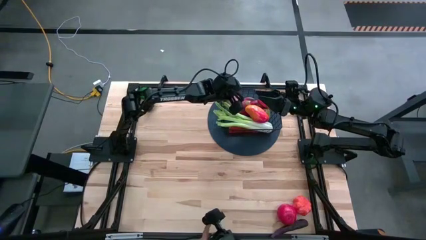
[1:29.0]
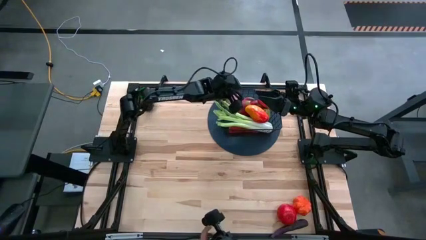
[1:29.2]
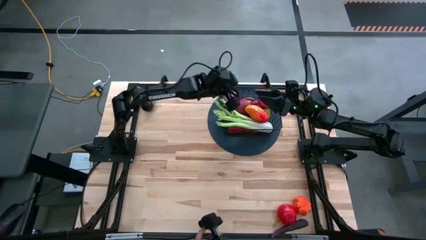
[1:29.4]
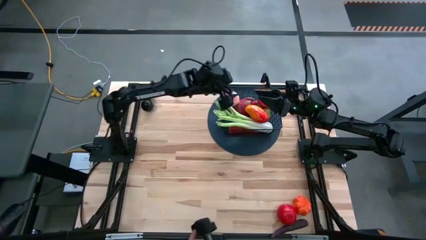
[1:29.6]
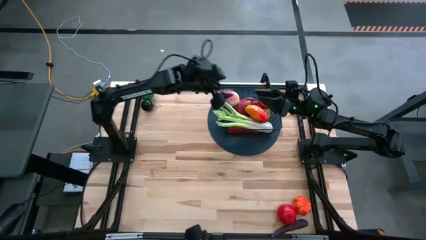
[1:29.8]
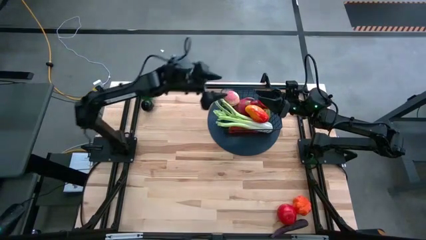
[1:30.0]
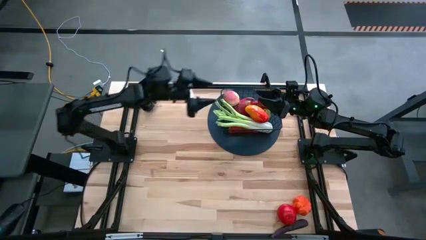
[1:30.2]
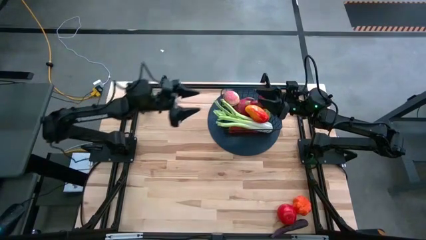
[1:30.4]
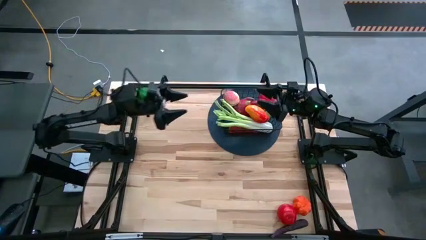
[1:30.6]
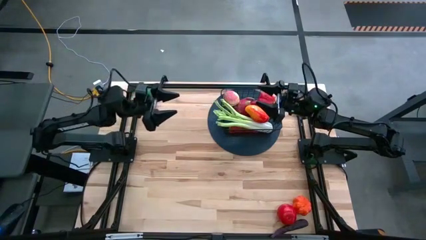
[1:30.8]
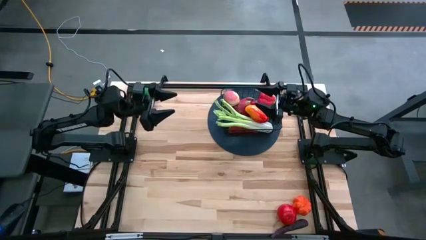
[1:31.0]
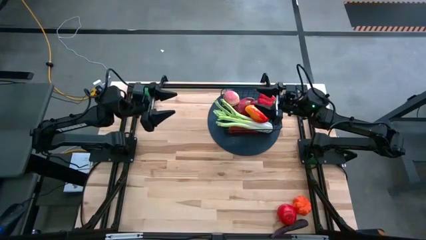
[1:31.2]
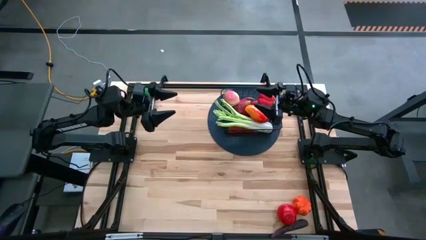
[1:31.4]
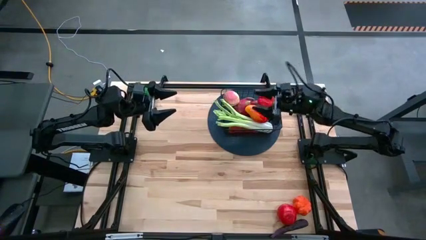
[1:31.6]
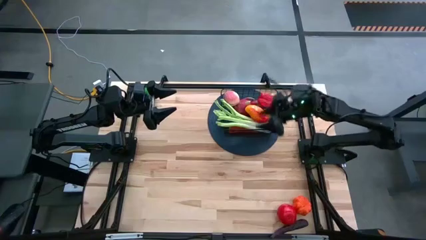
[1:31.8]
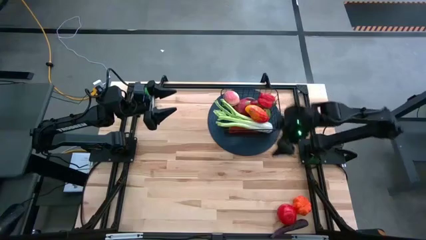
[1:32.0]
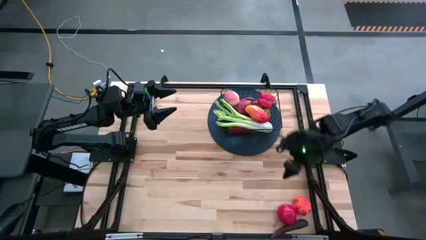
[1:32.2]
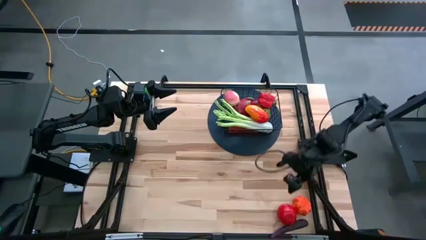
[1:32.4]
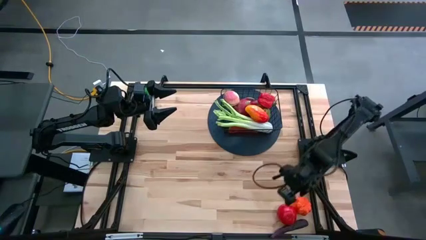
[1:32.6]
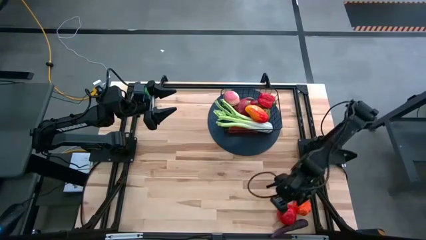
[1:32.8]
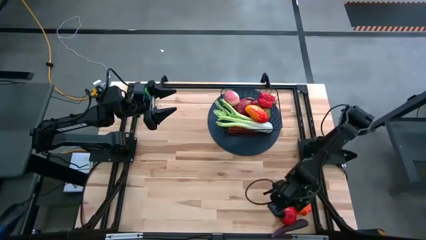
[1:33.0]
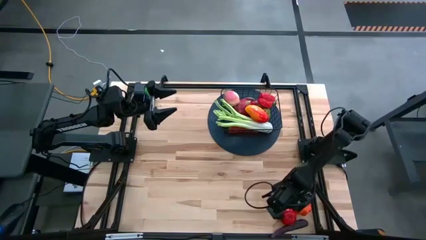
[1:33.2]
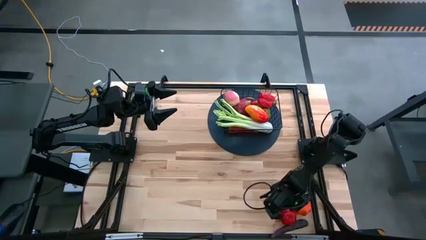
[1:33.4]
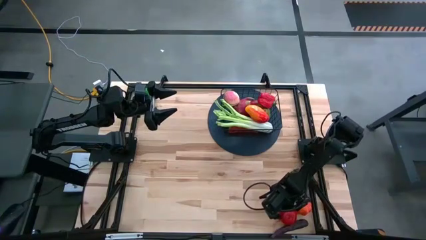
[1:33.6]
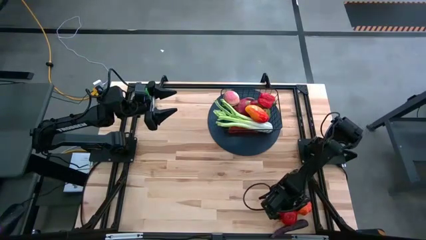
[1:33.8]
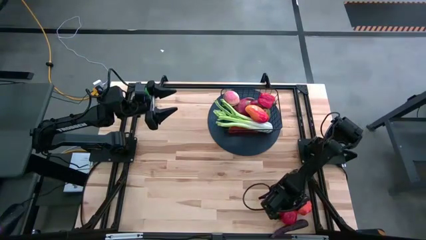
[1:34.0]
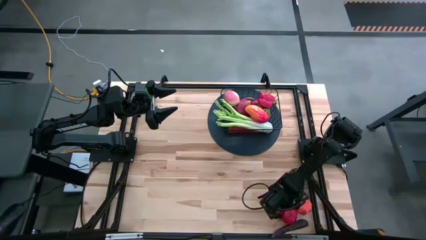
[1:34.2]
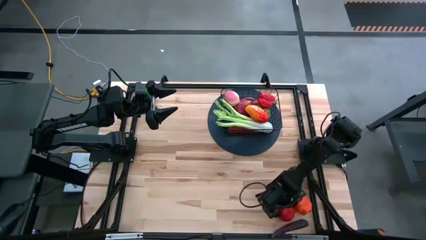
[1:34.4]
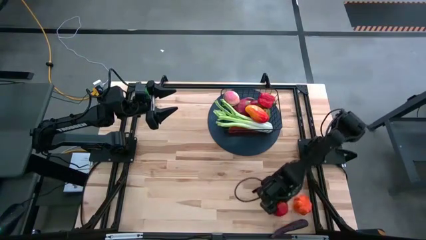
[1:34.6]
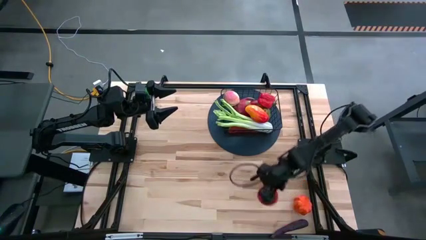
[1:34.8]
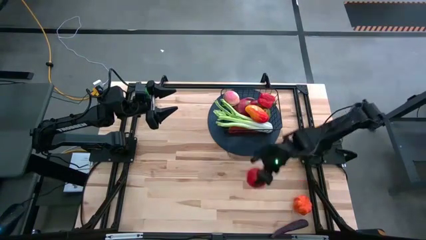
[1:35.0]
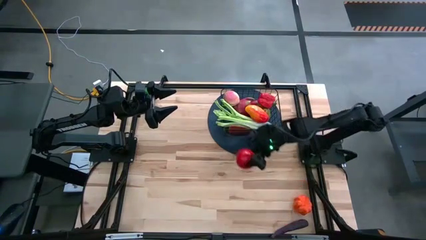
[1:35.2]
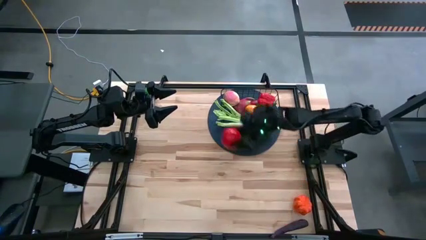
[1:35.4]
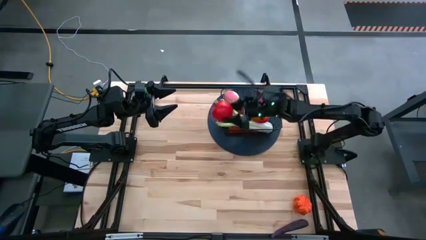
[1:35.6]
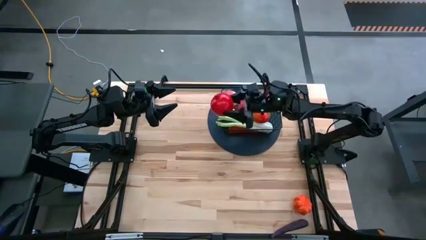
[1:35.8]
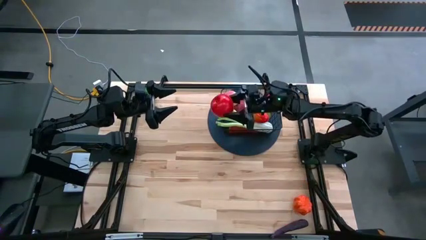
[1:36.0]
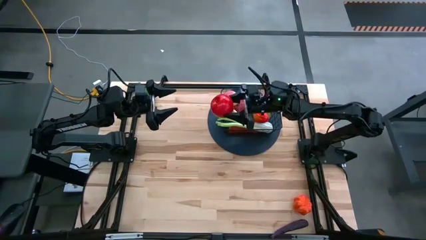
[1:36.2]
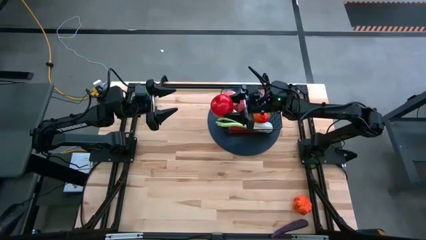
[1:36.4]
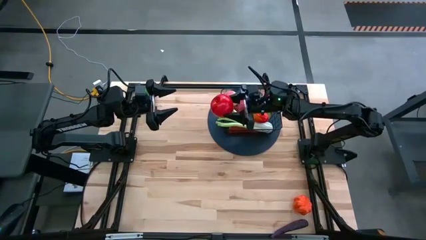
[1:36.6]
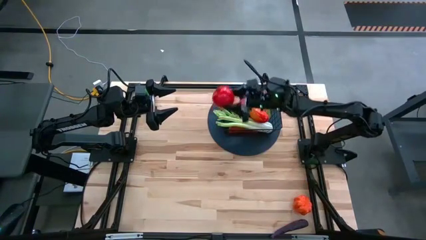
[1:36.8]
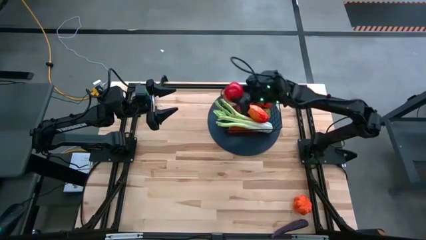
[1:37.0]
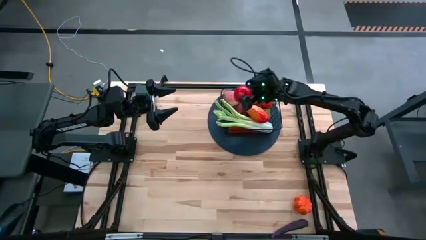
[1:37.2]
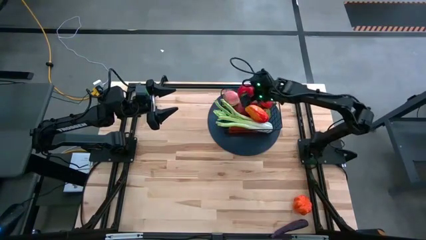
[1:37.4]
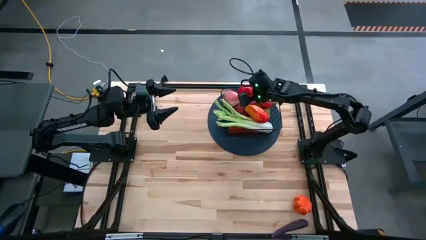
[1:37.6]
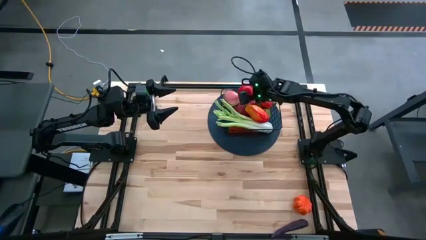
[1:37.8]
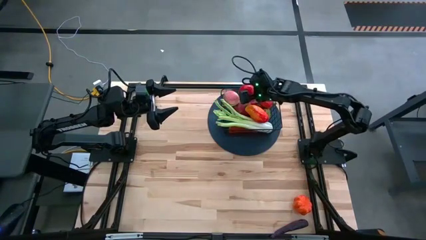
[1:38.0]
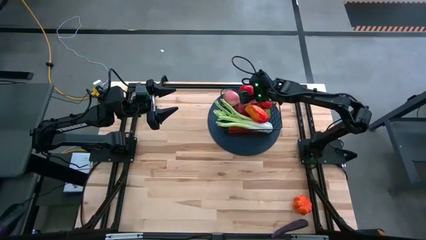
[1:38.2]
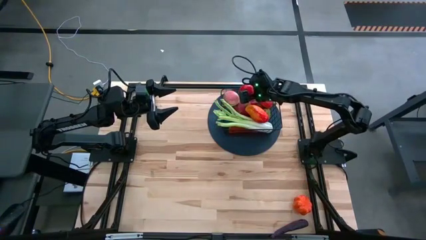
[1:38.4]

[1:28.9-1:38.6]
Task: Build produce basket
Put the apple into the black wire basket

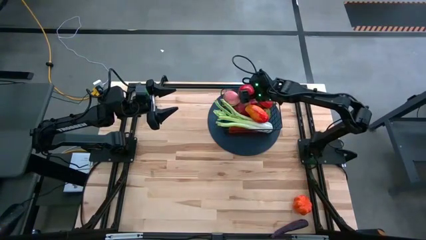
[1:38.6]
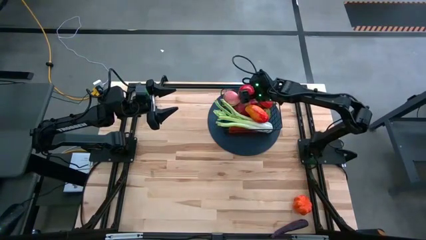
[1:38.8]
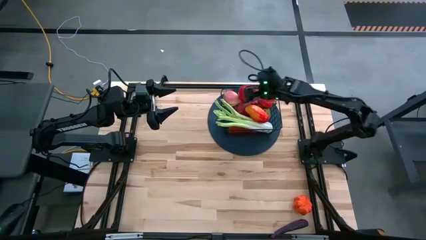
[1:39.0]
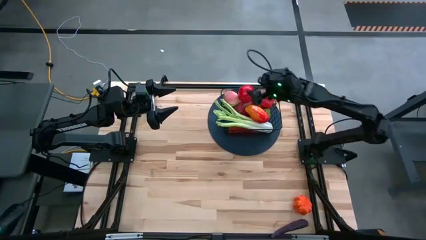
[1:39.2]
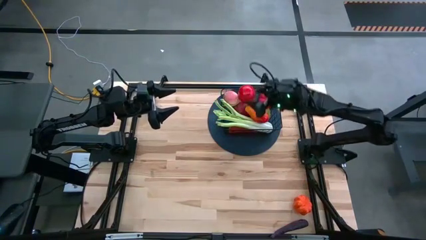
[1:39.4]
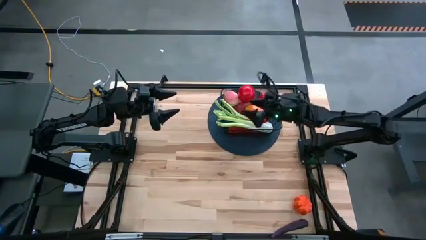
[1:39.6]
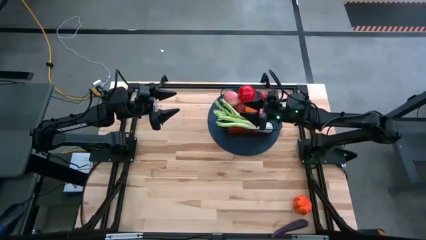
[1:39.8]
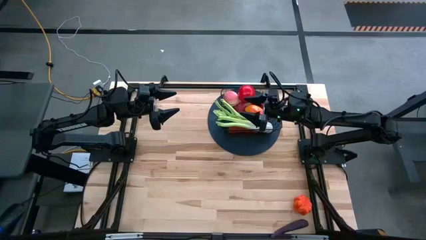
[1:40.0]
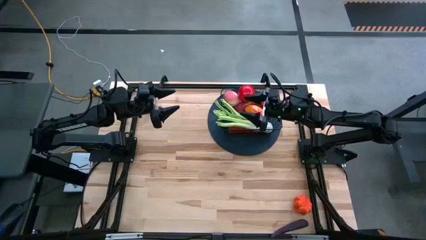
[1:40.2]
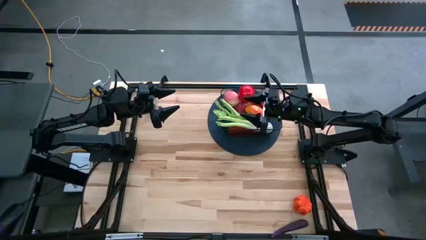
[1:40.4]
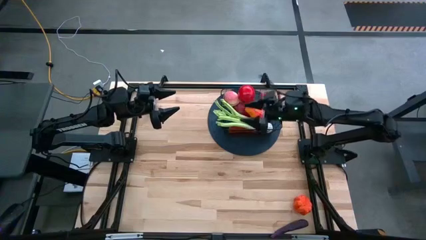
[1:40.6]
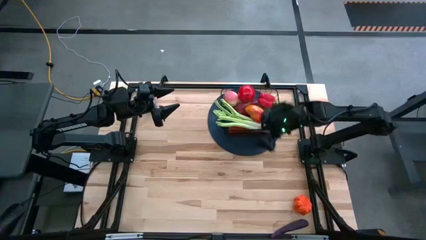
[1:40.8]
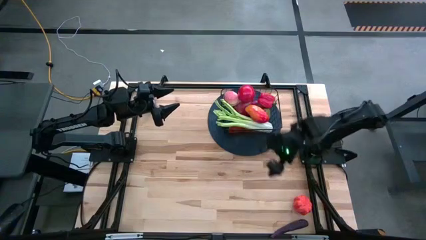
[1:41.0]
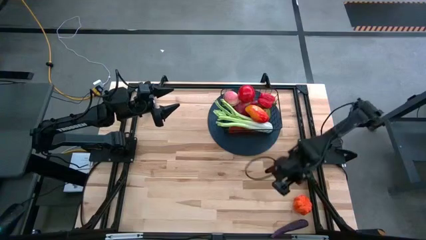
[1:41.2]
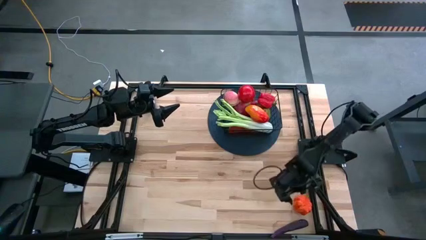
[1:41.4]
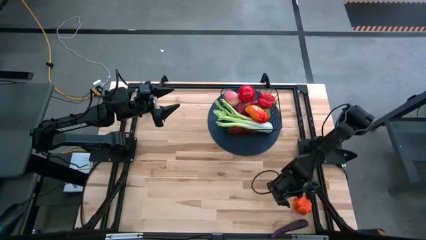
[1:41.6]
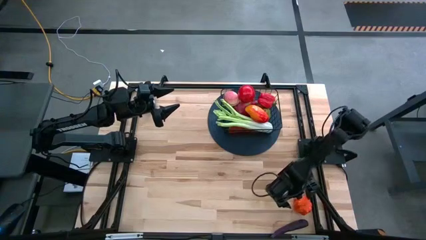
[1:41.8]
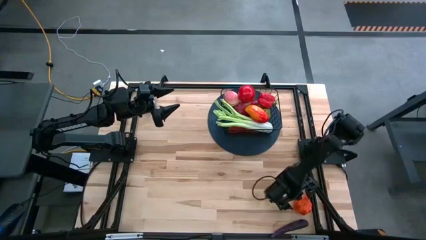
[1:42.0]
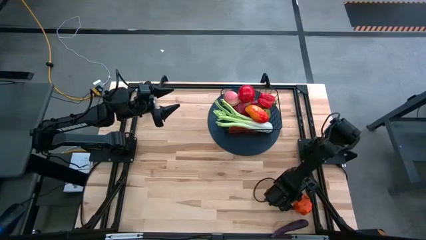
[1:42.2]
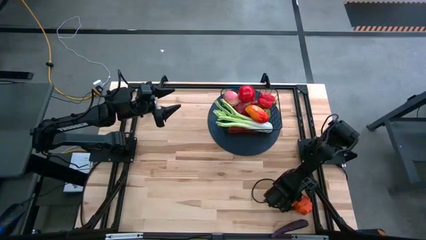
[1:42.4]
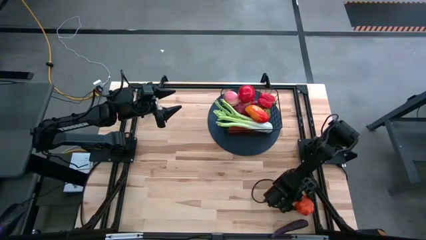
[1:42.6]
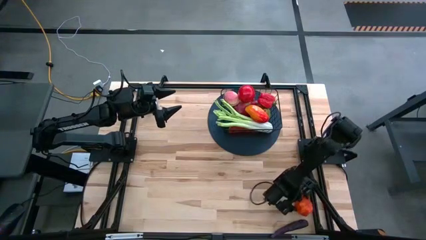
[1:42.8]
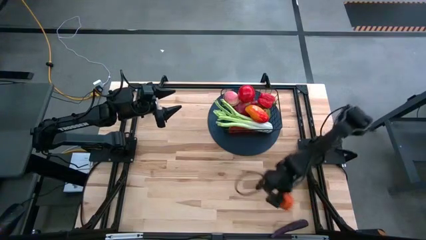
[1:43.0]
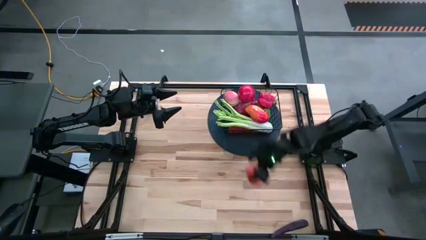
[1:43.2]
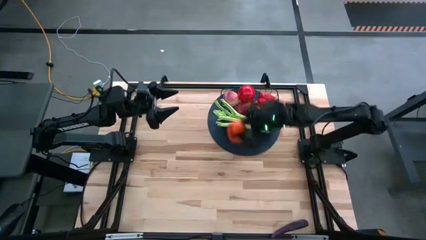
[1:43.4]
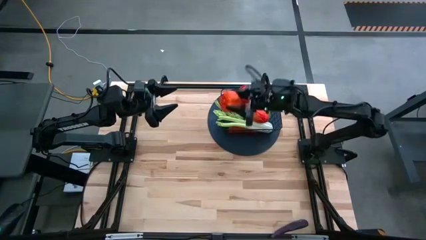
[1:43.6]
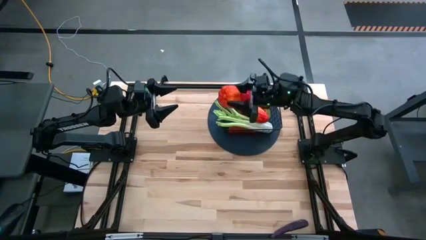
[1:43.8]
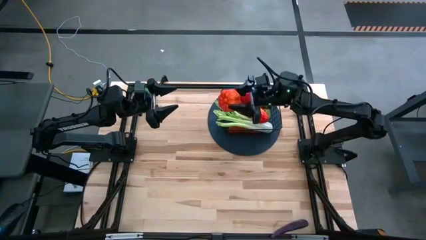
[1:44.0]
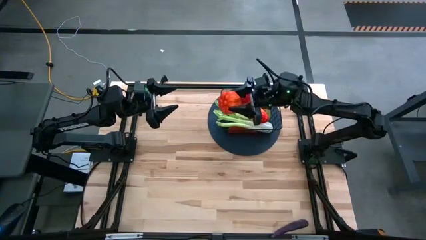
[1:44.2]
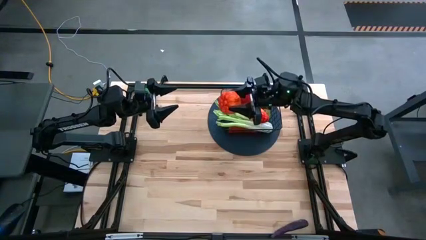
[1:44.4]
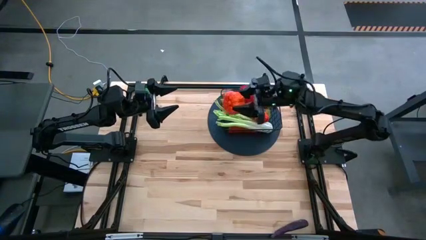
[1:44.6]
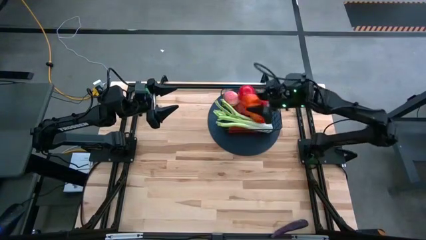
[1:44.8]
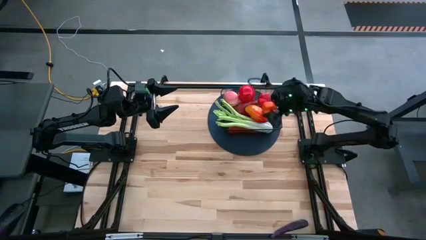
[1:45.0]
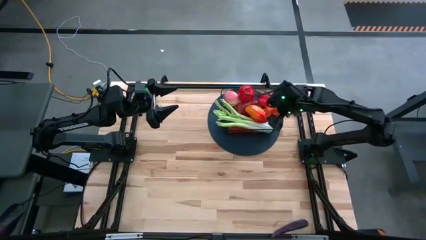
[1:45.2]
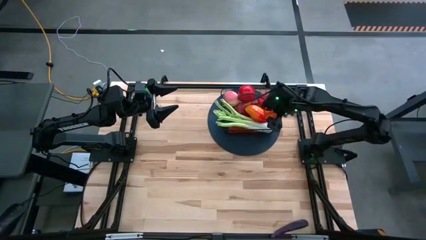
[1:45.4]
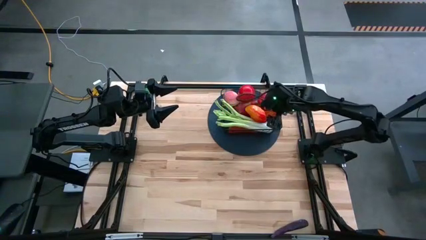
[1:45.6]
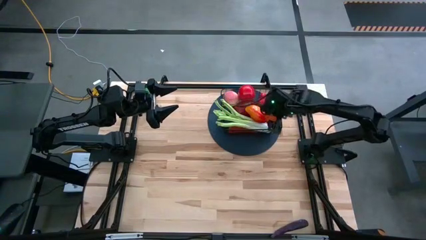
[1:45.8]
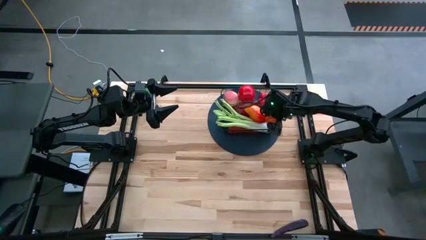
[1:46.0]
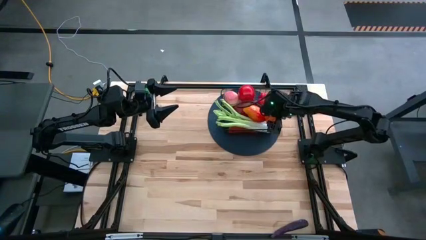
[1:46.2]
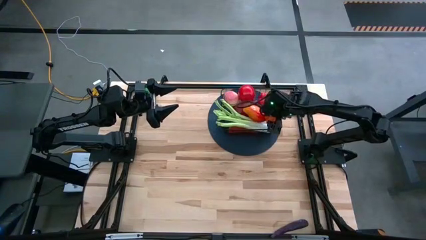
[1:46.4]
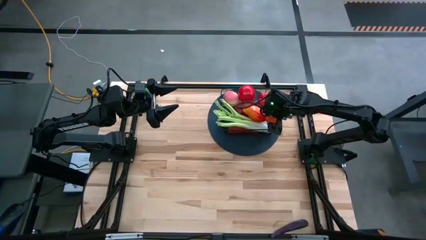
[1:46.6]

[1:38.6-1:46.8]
Put the pumpkin into the black wire basket
